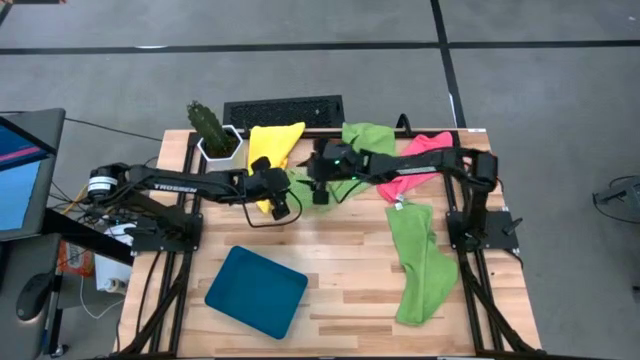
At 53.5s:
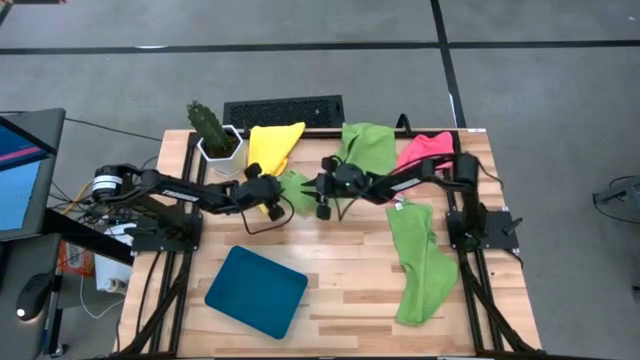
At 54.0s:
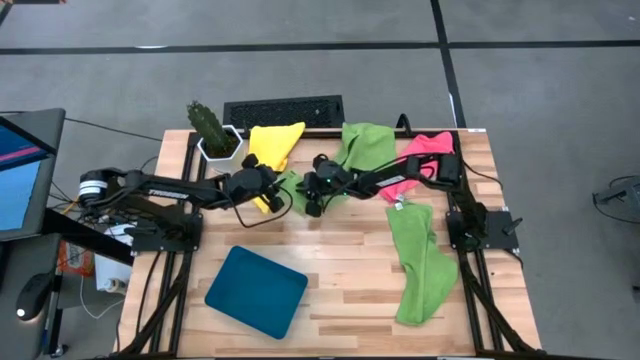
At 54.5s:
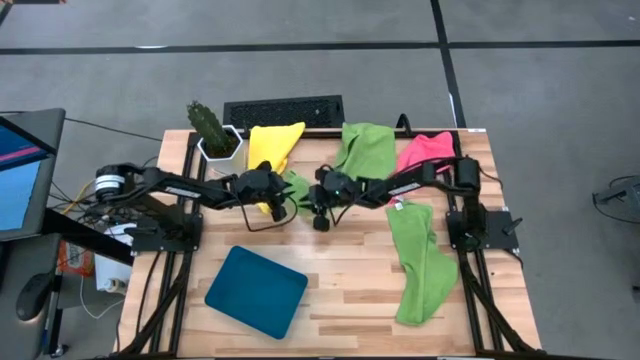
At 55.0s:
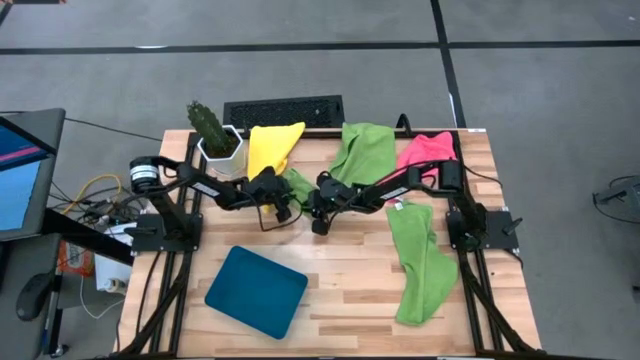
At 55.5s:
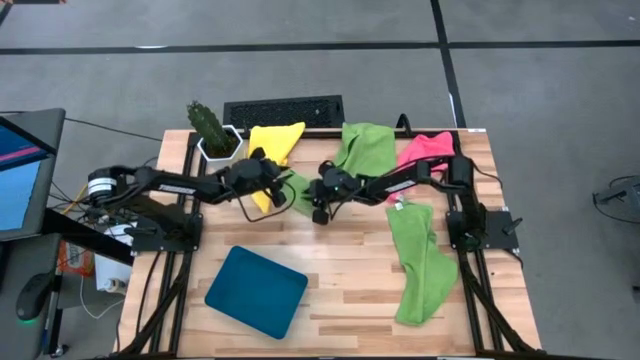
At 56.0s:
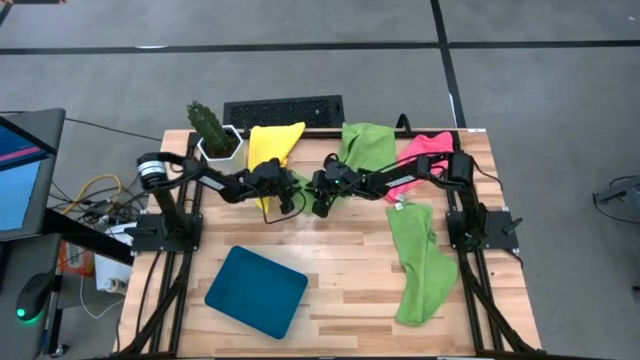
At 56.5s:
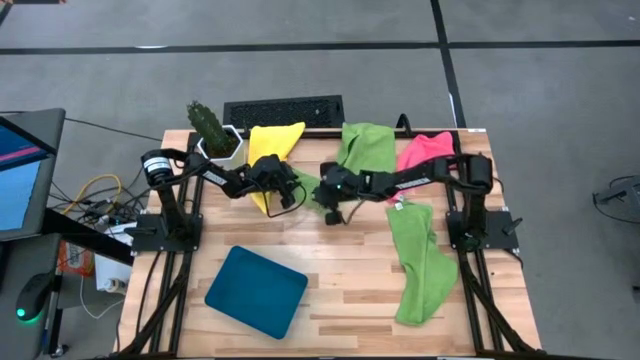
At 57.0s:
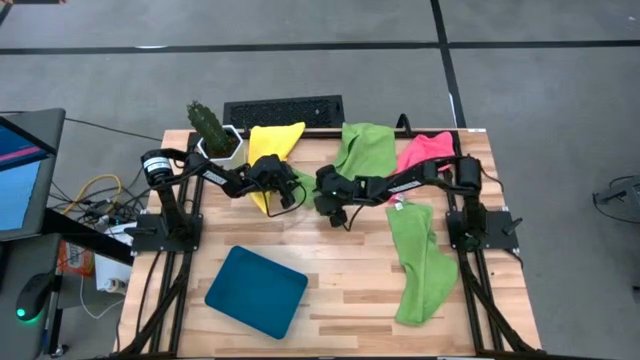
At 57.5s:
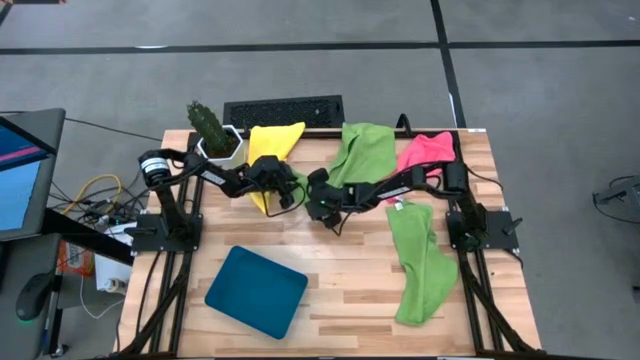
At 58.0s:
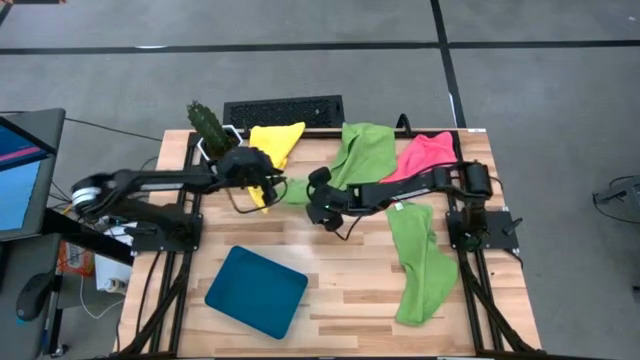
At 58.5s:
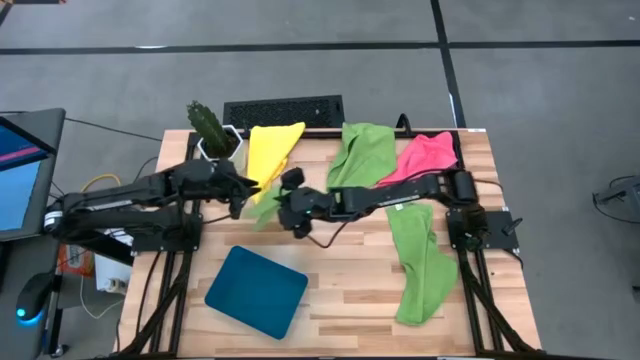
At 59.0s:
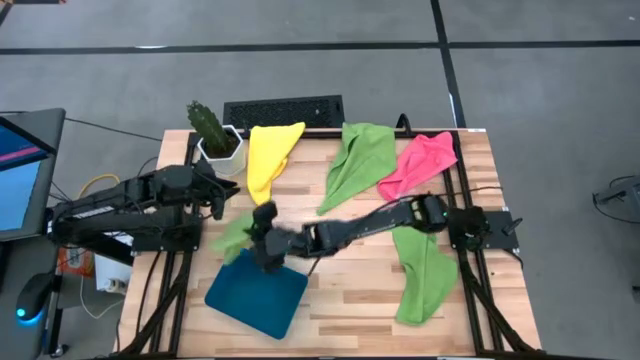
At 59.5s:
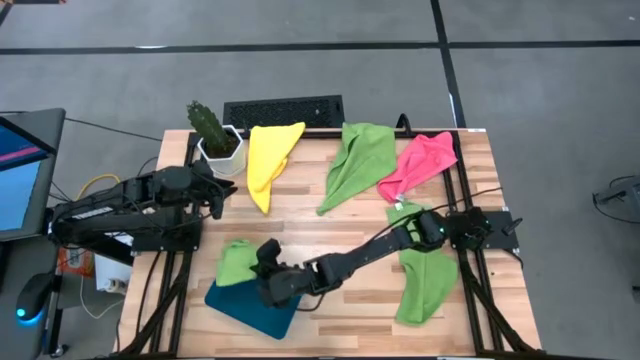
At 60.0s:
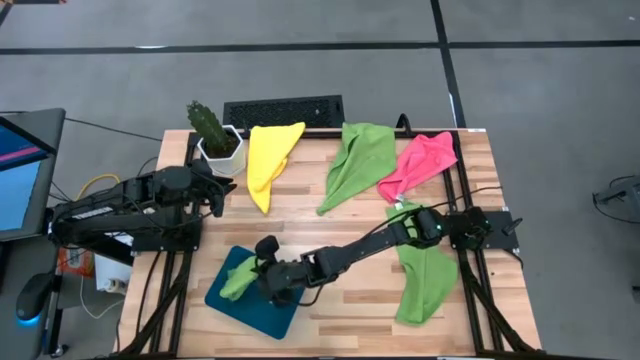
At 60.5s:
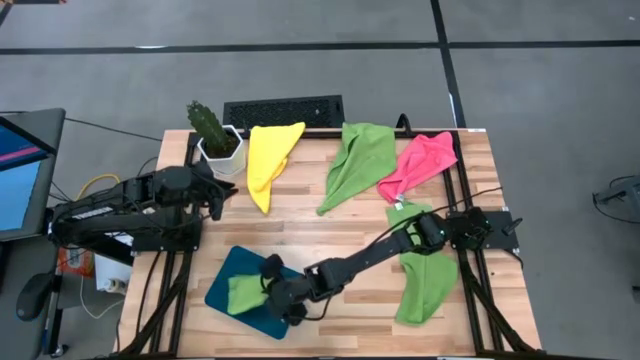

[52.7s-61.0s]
Task: Fold microfiber towels
Put the top left green microfiber in the blue bin

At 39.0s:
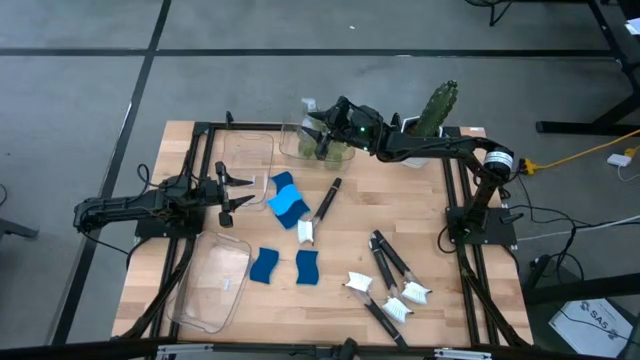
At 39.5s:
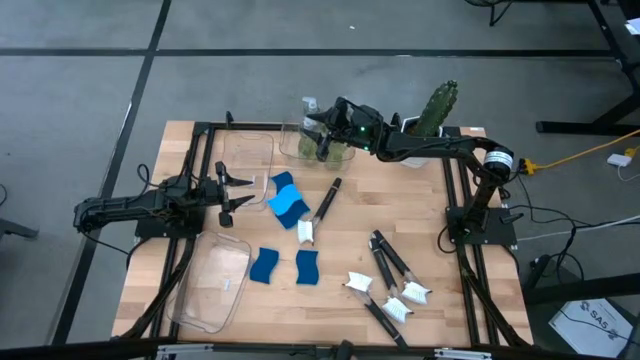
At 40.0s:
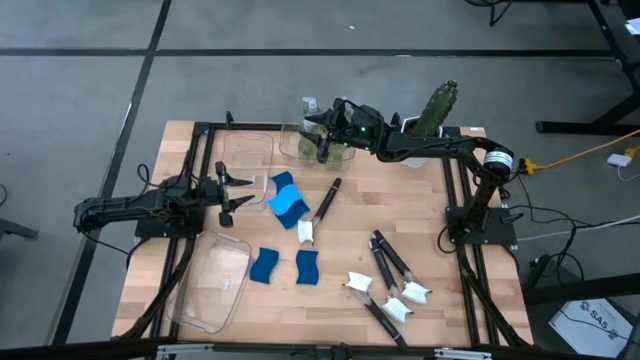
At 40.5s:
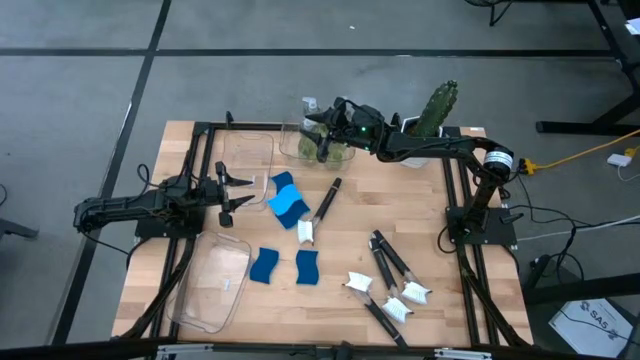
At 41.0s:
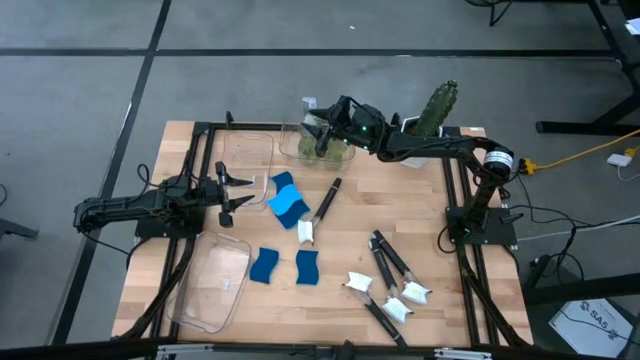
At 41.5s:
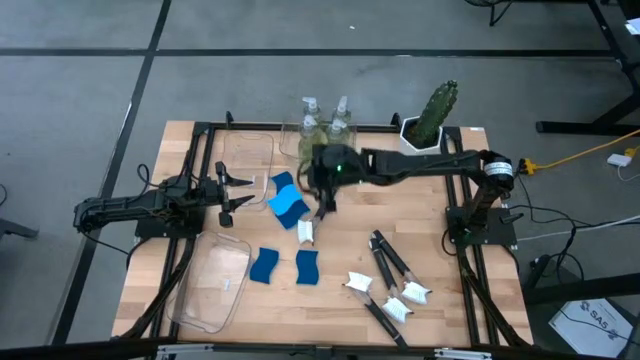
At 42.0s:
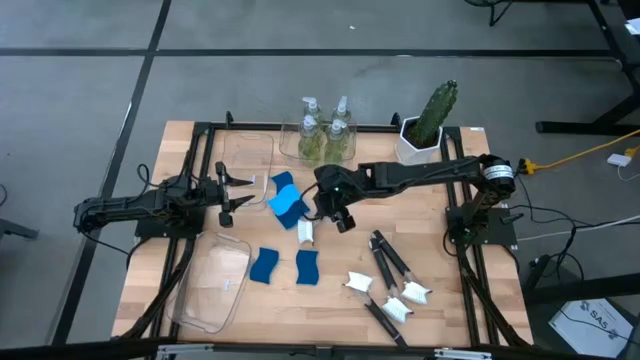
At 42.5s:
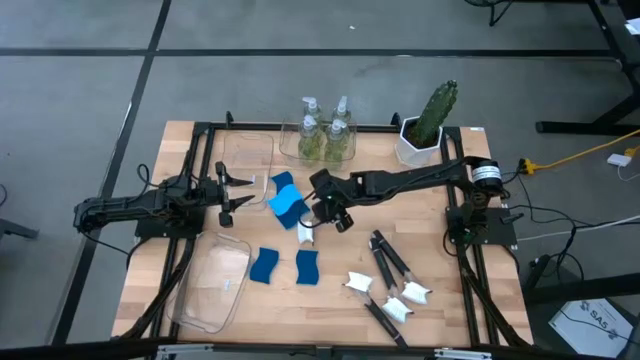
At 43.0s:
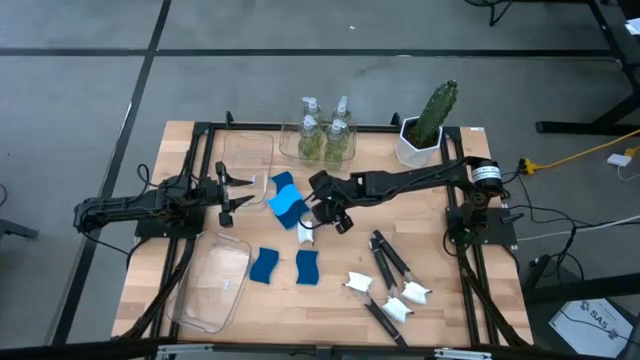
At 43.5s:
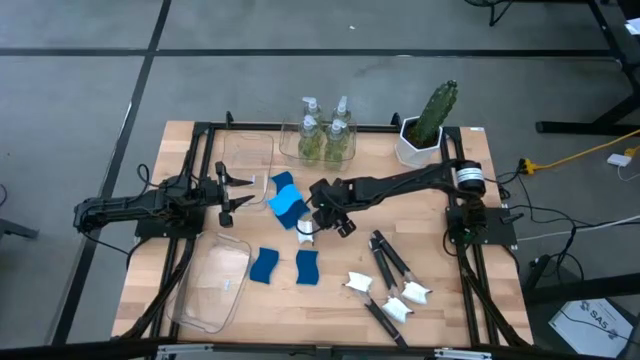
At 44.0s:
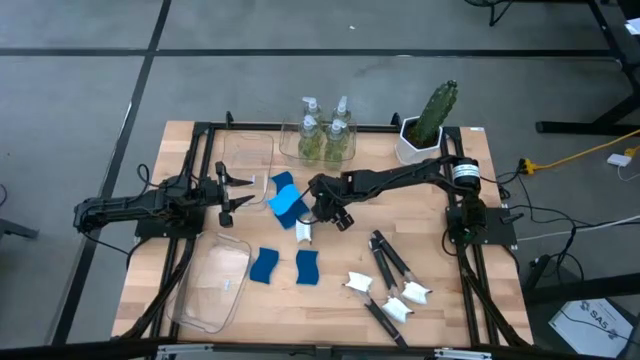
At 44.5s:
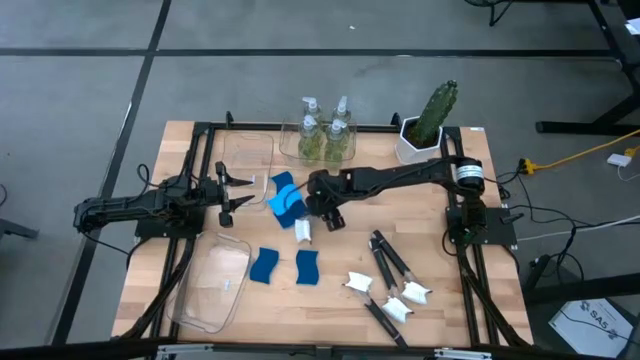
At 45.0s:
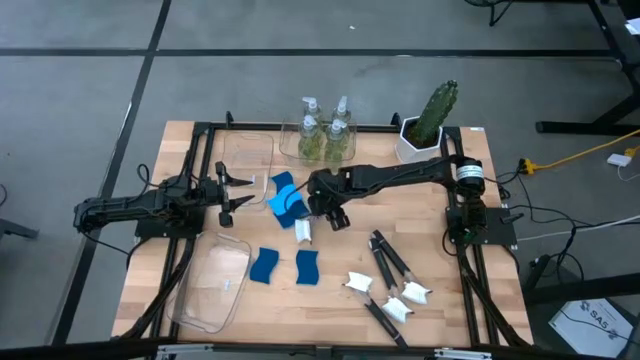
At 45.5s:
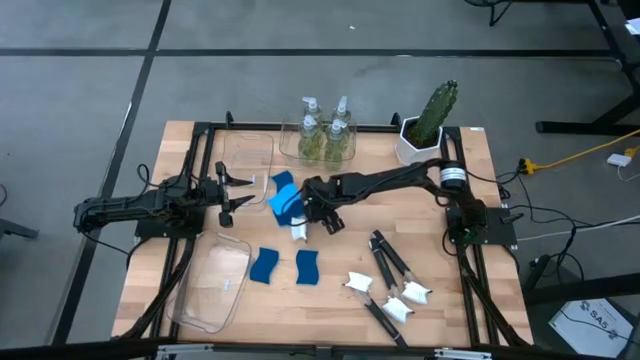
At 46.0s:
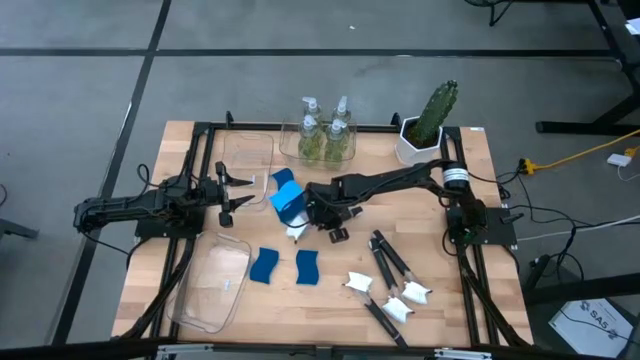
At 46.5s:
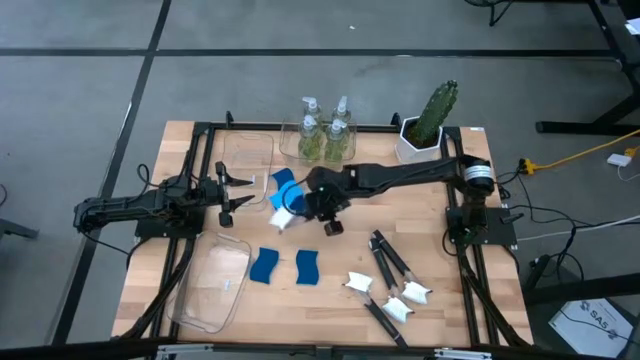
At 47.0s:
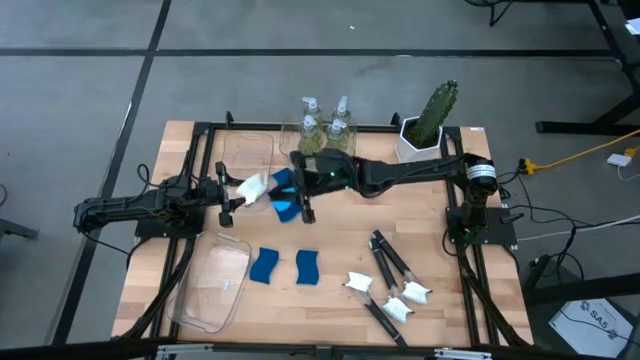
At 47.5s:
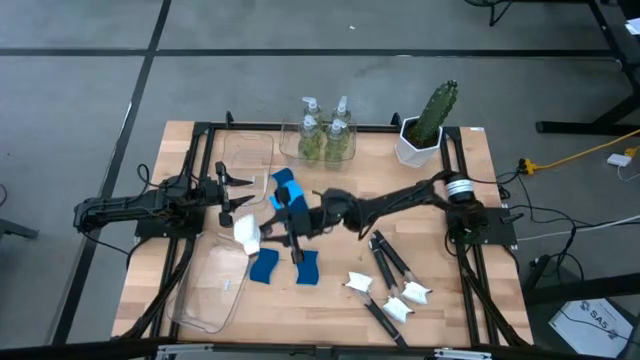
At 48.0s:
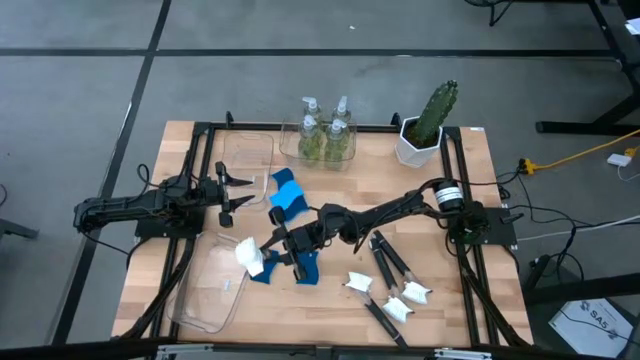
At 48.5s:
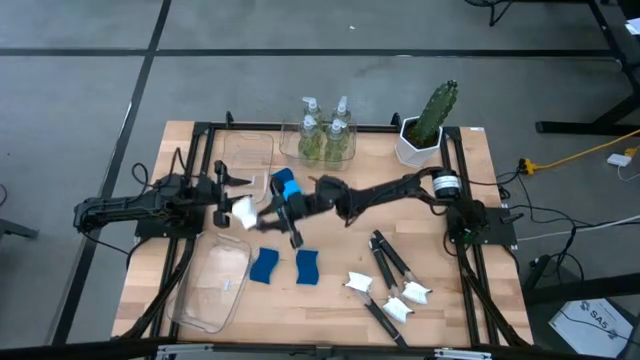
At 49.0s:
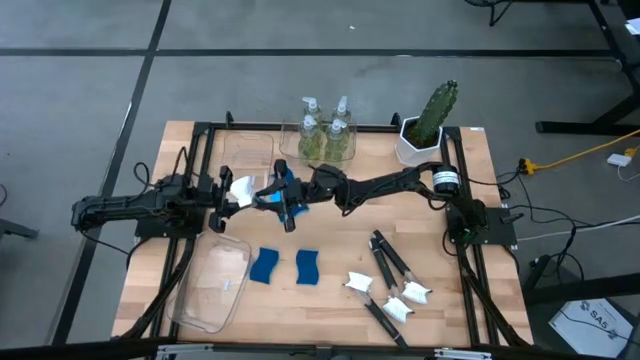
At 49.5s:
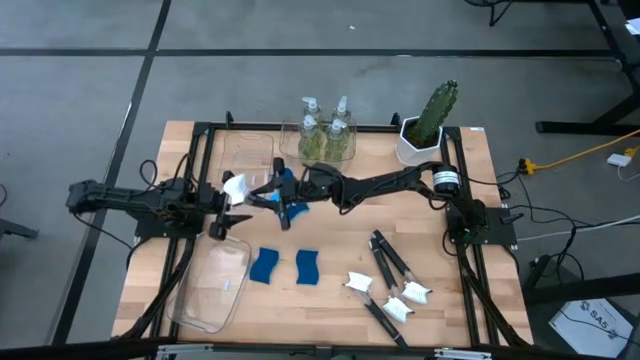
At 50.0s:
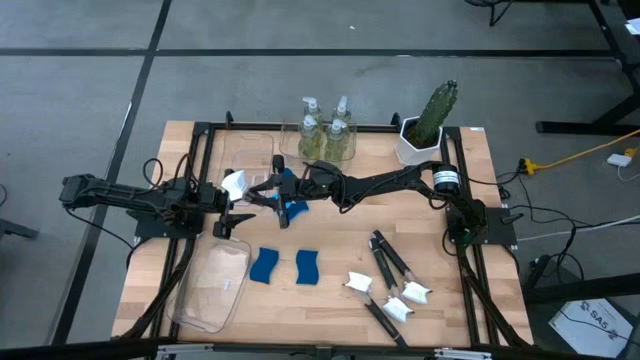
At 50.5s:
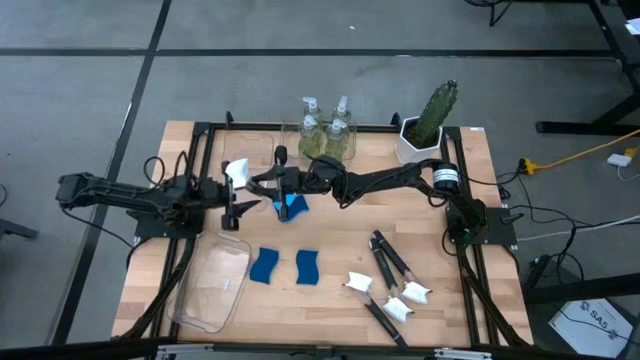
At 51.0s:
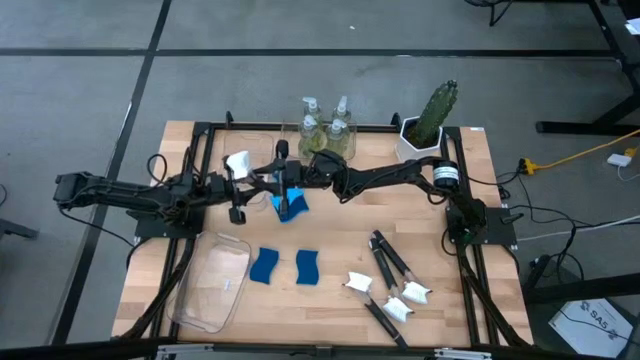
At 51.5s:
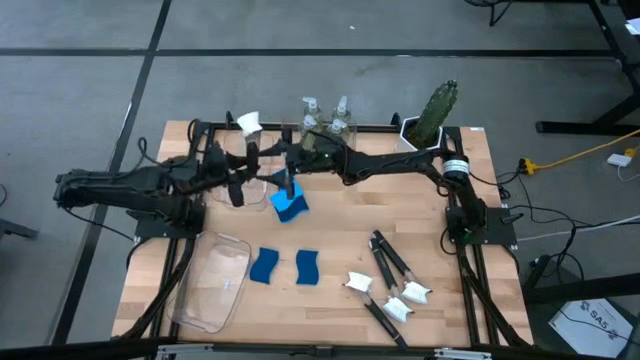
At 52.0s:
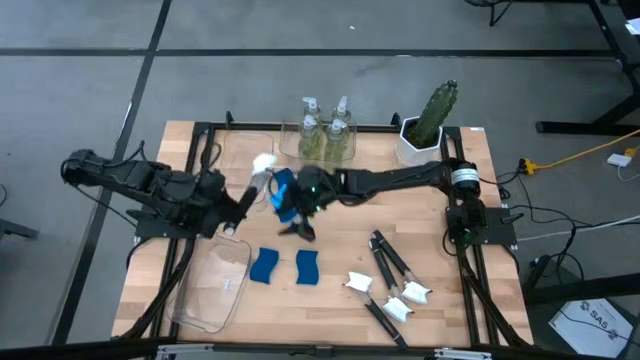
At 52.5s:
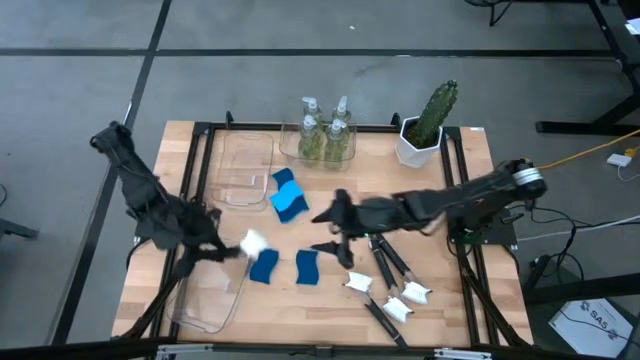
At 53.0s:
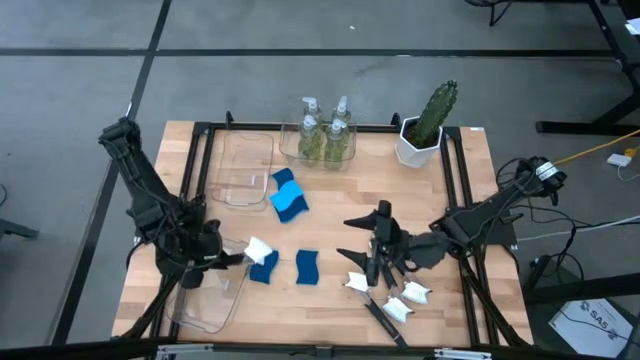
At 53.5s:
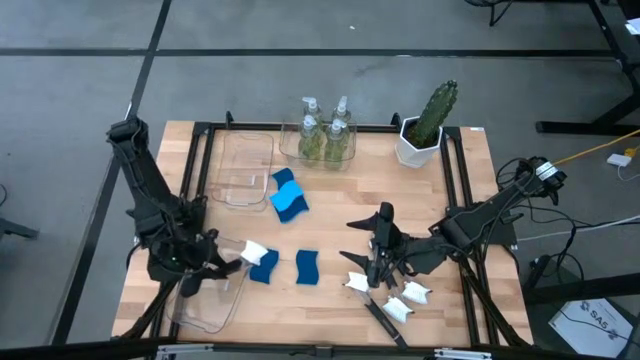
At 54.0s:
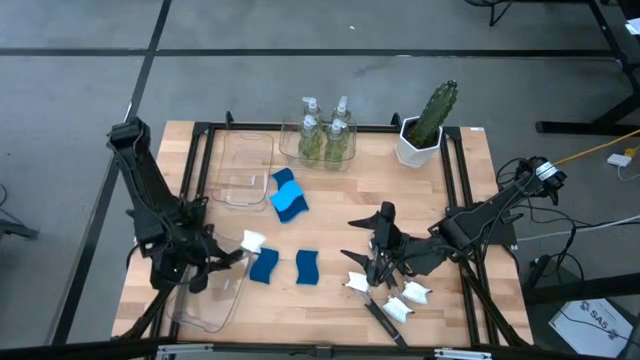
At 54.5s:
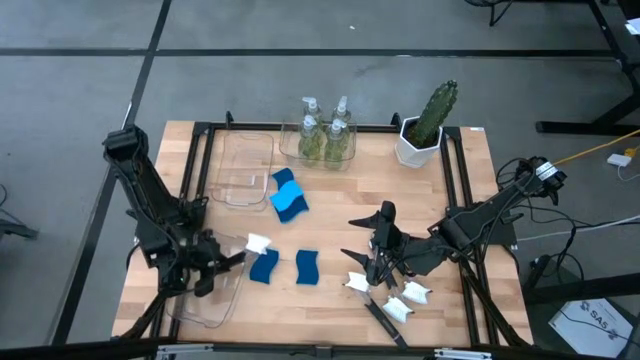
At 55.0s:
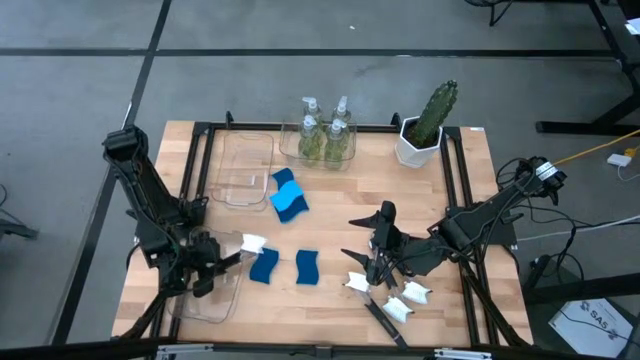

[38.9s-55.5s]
Task: Pick & Place Kitchen Sink Supplies
Put the black dish brush into the bottom left transparent bin
